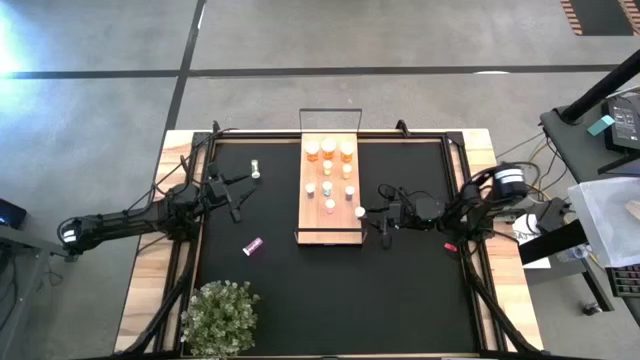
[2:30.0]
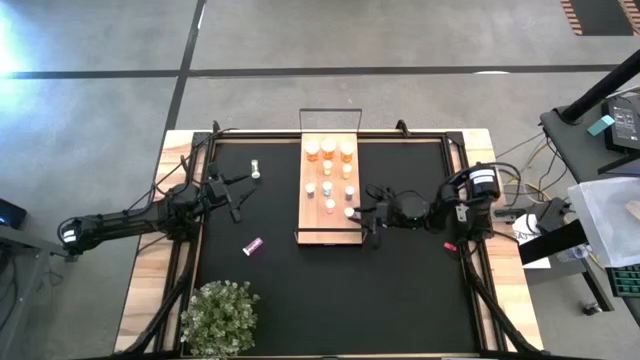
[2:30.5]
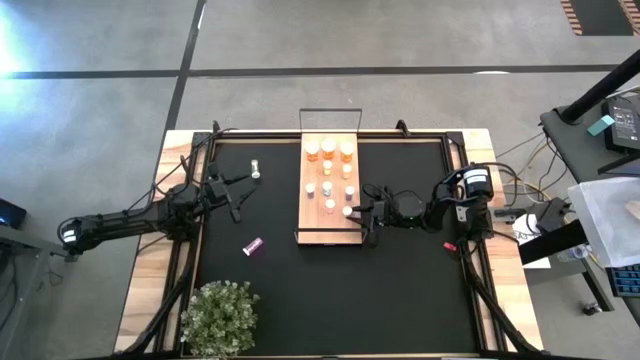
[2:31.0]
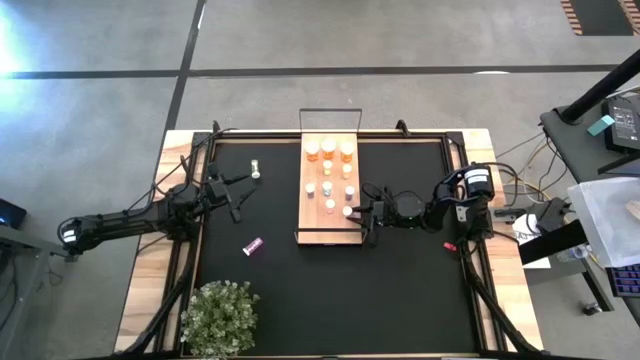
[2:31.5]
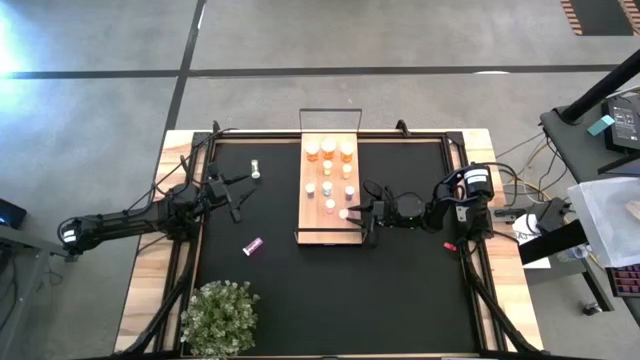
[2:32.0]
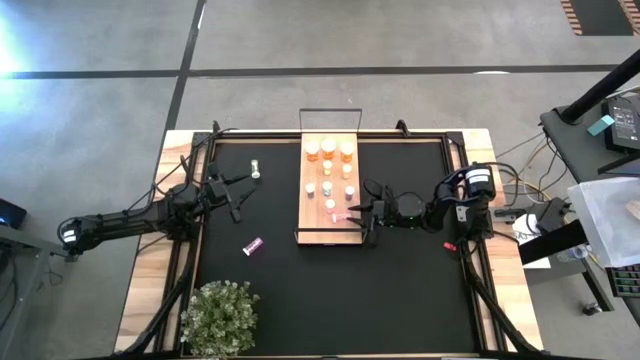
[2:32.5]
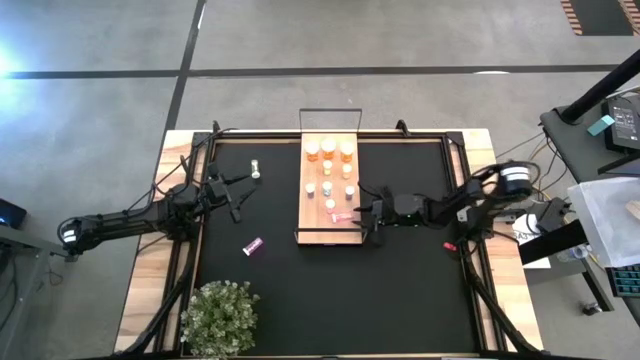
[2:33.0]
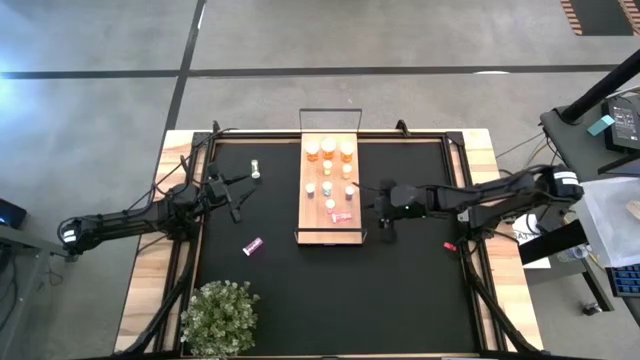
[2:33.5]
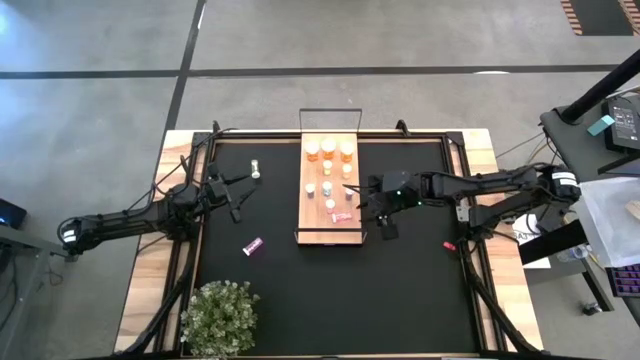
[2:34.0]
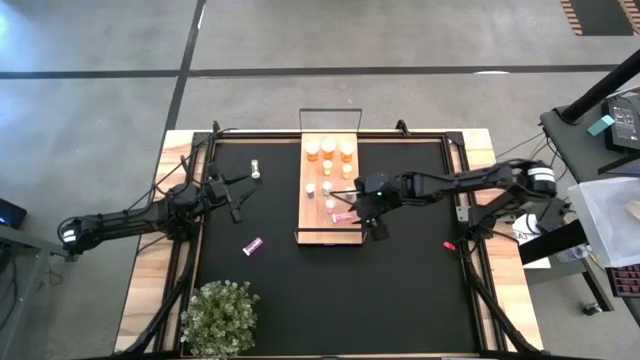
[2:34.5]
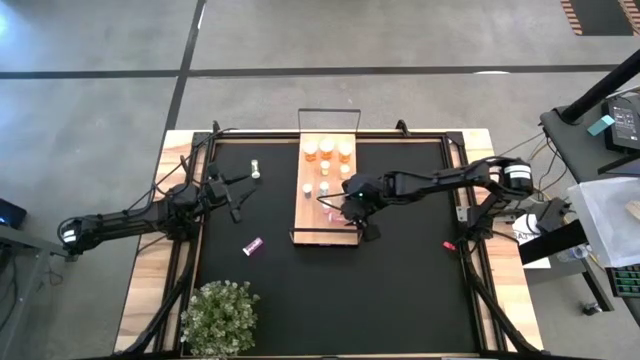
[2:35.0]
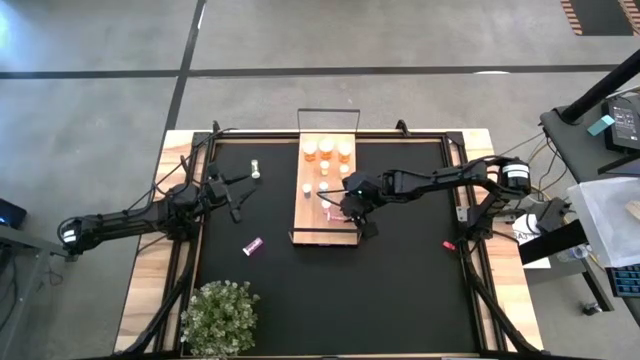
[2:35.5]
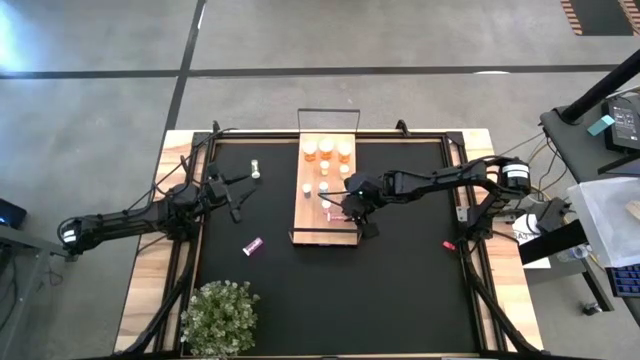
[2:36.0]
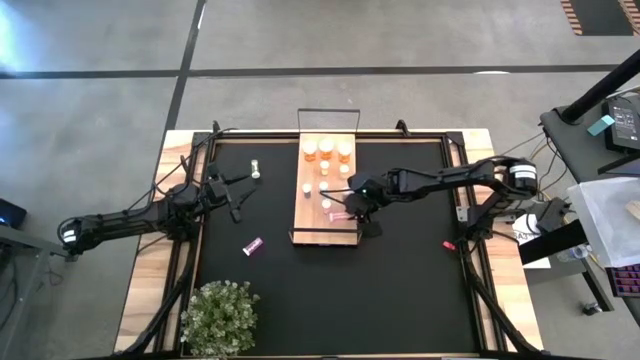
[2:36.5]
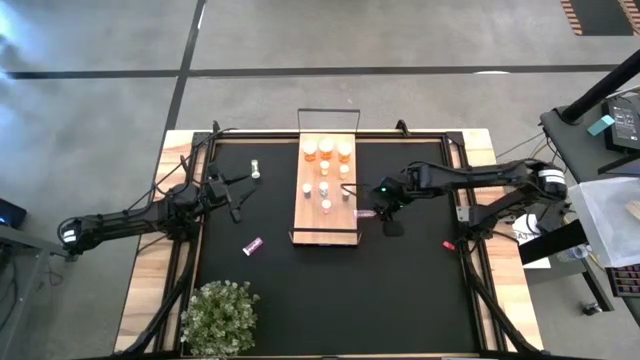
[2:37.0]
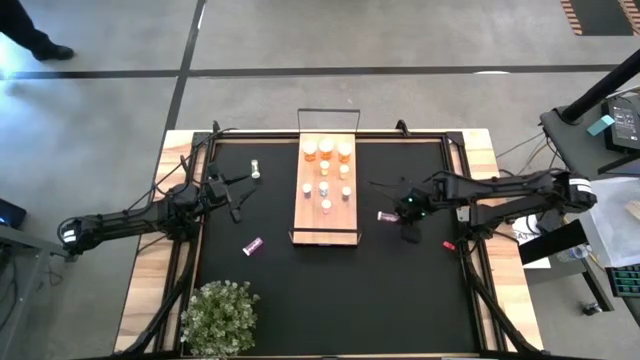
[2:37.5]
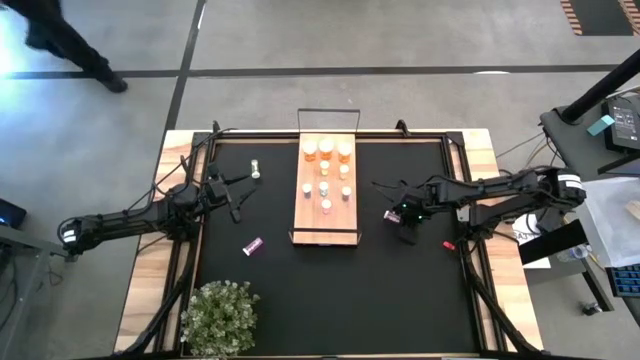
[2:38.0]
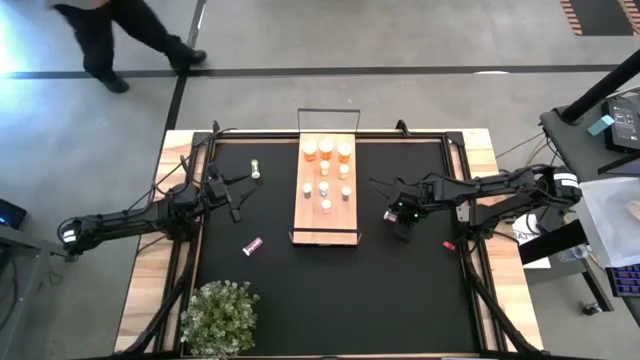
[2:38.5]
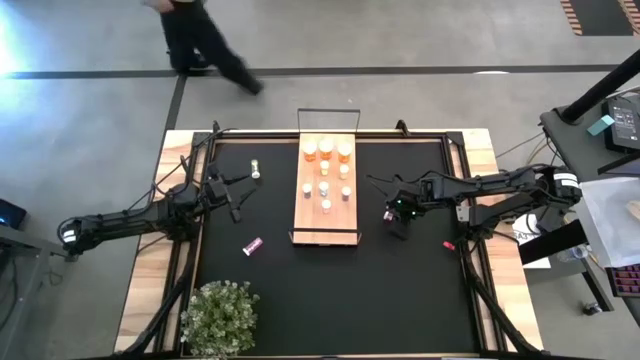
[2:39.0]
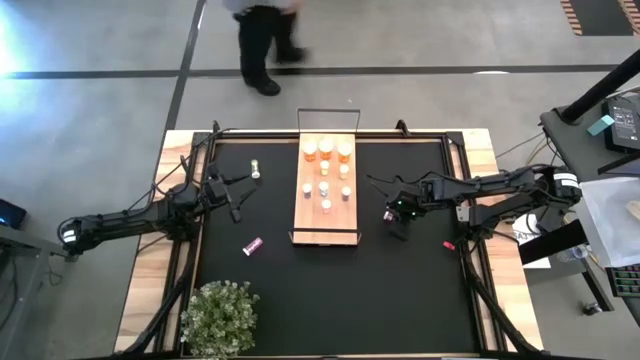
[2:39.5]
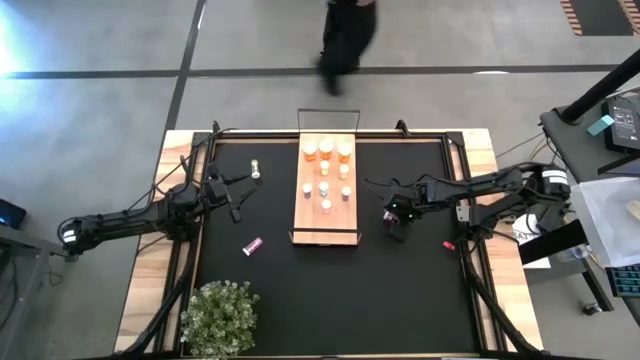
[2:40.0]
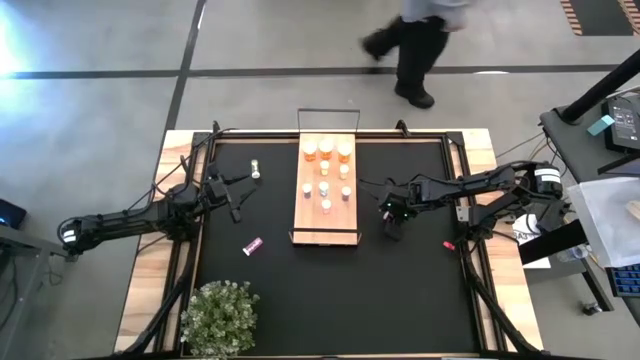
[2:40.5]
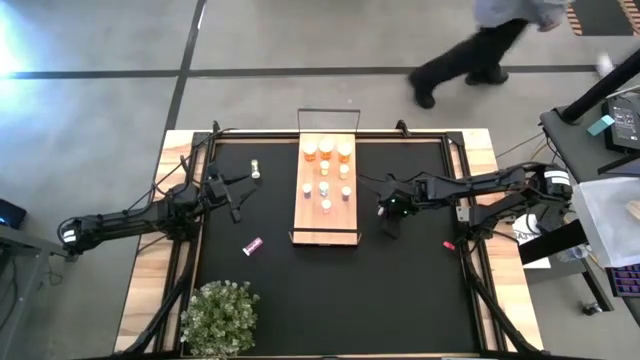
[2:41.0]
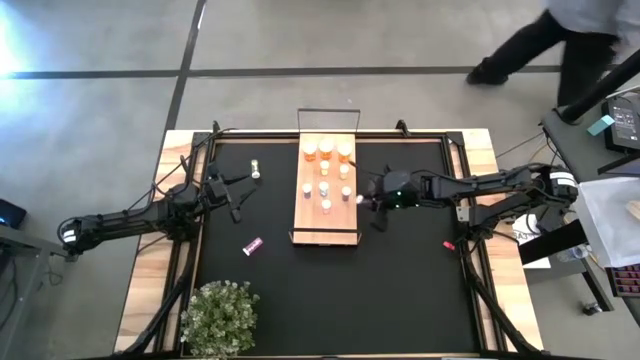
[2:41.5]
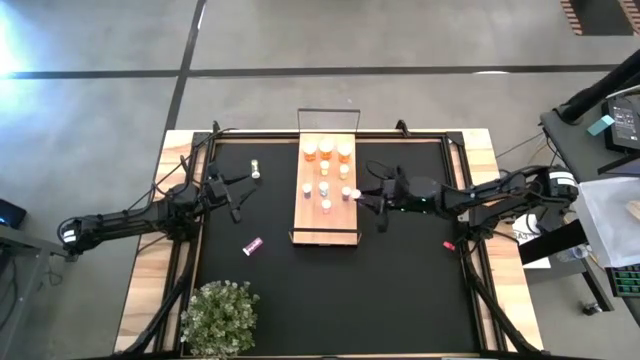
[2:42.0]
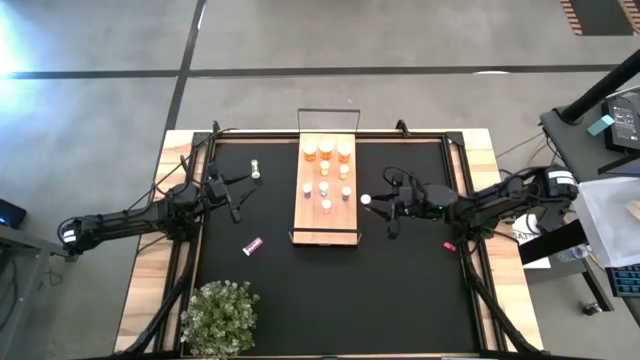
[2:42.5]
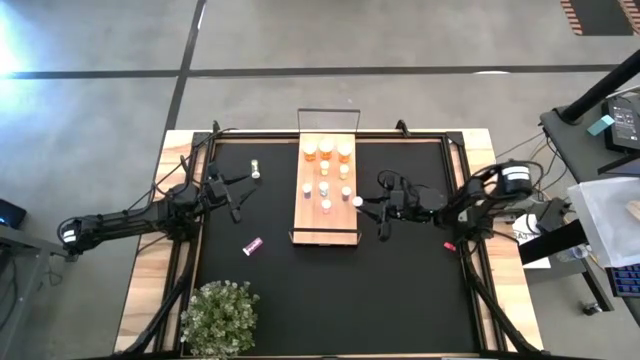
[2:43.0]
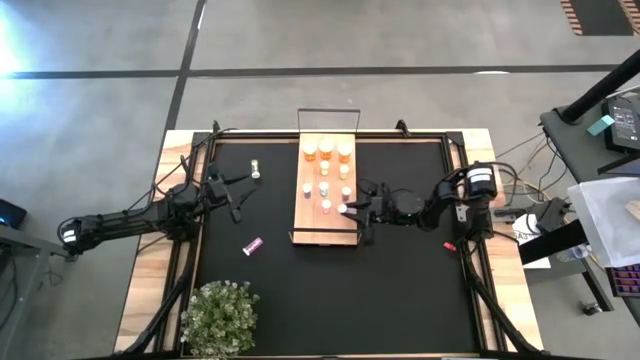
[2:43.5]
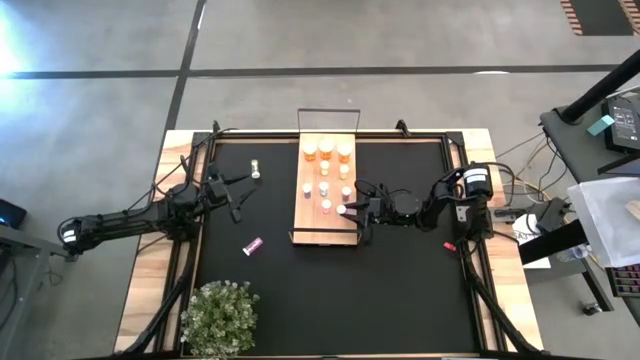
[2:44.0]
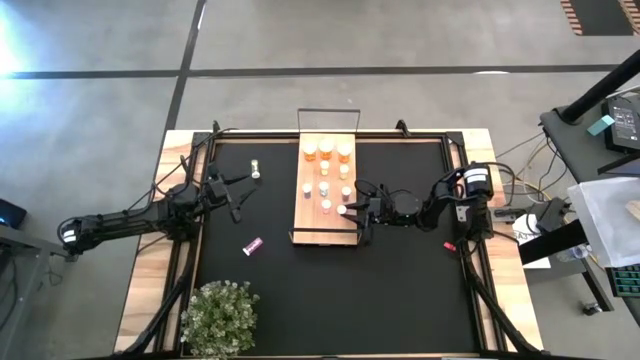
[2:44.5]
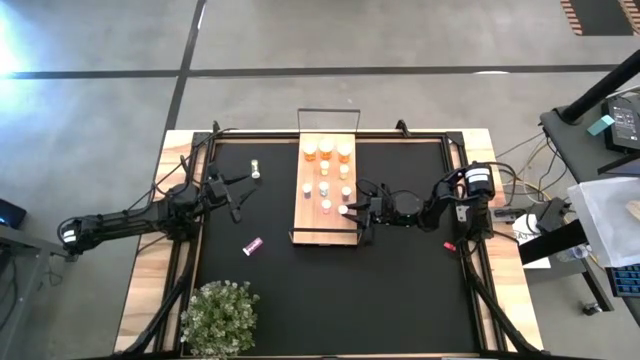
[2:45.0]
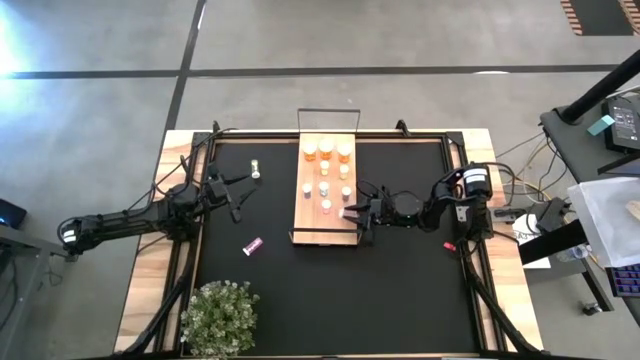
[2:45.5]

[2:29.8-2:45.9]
Task: Pick and place medicine bottles onto shelf by color
Put the bottom pink medicine bottle on the shelf aligned with the other pink medicine bottle

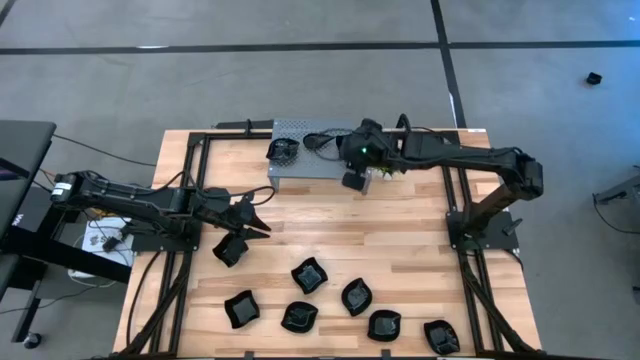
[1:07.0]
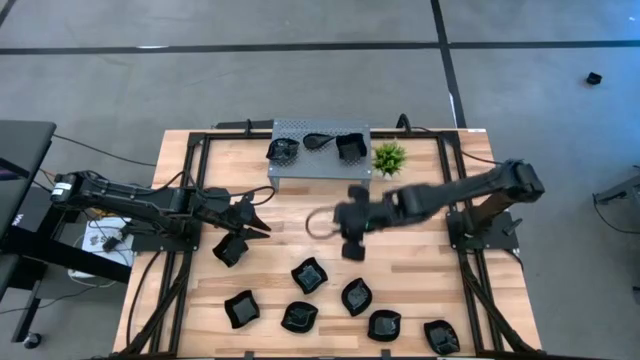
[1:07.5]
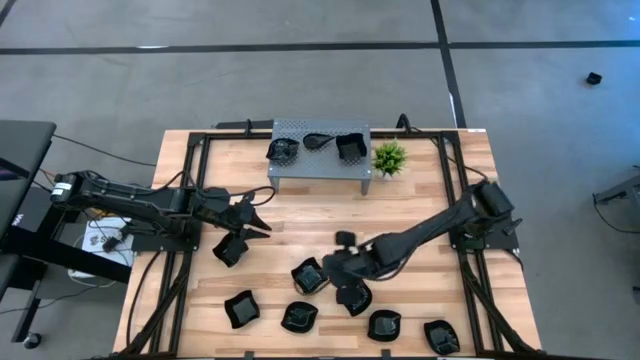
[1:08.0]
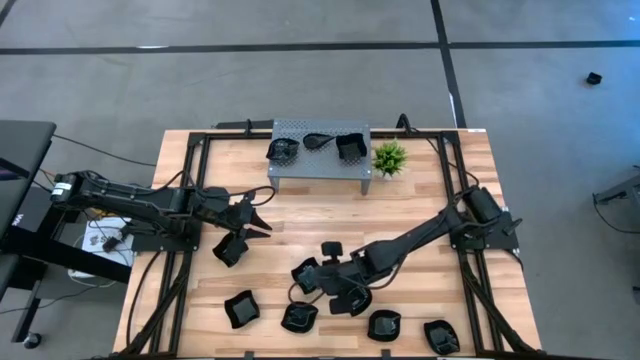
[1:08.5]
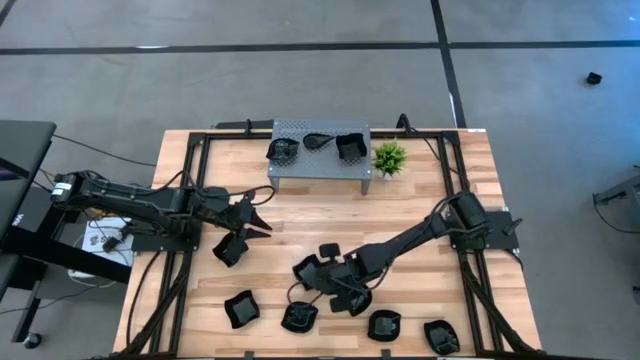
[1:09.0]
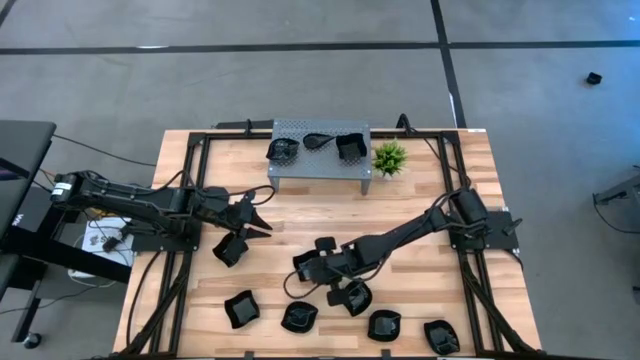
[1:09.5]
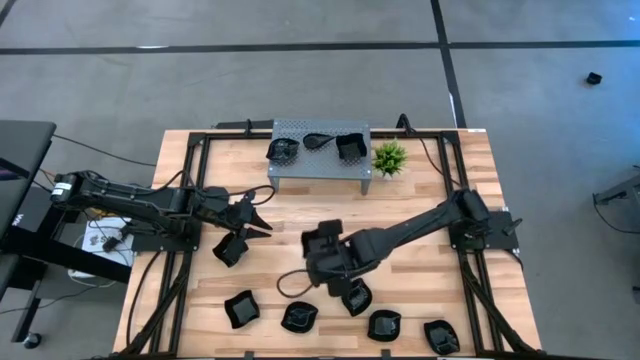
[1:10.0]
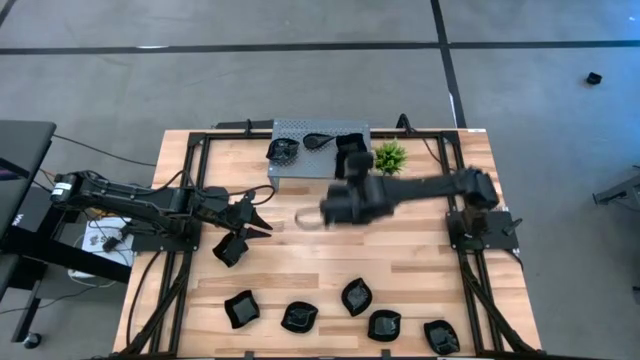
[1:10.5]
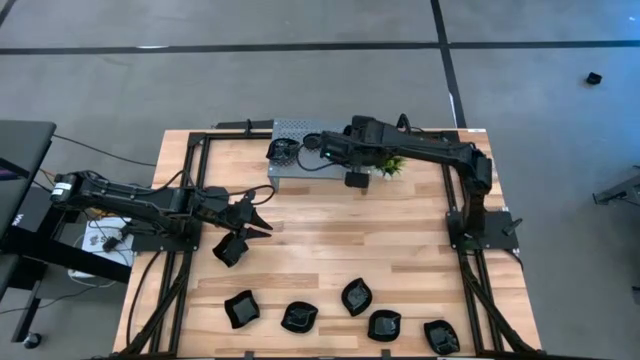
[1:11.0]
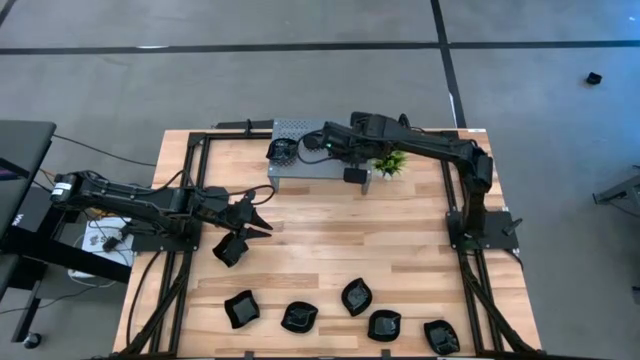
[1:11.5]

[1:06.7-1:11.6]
Task: Pick & Place Mini shaped plates
Stack the distorted square plate on top of the distorted square plate on the shelf
